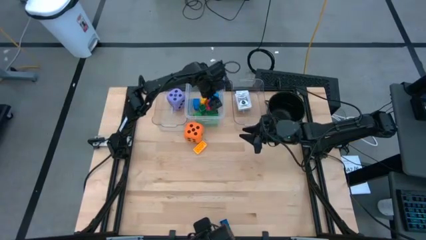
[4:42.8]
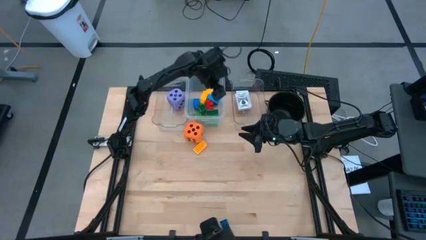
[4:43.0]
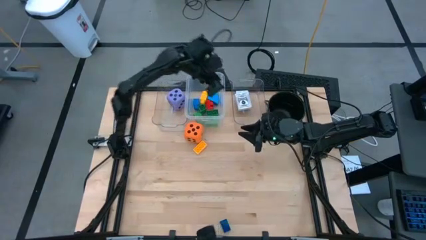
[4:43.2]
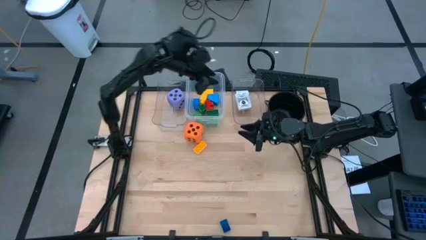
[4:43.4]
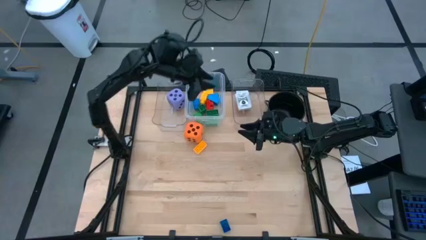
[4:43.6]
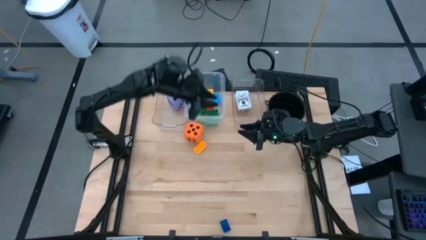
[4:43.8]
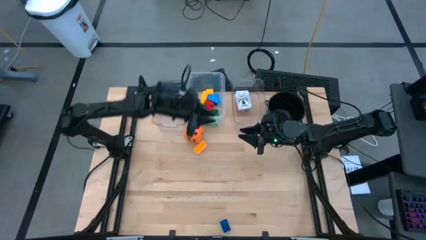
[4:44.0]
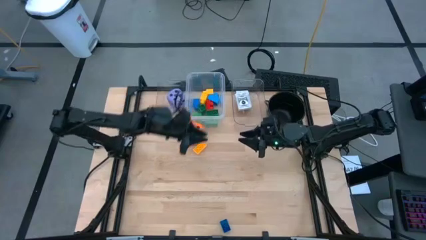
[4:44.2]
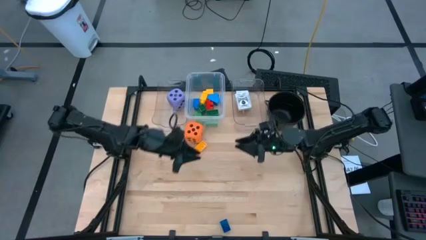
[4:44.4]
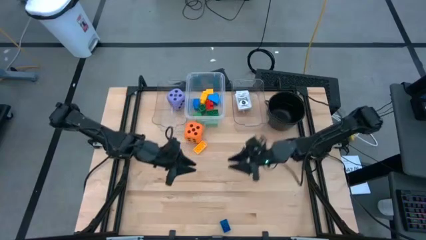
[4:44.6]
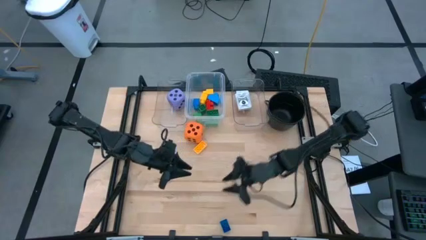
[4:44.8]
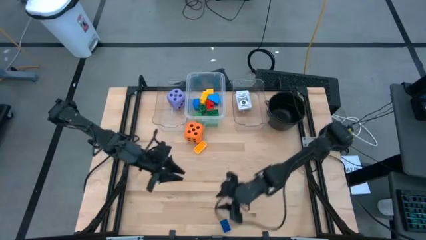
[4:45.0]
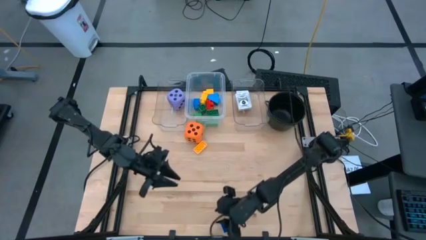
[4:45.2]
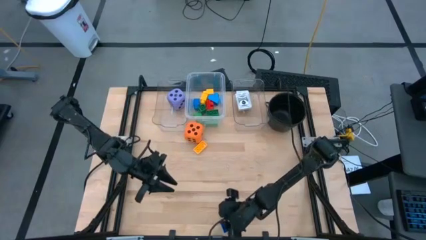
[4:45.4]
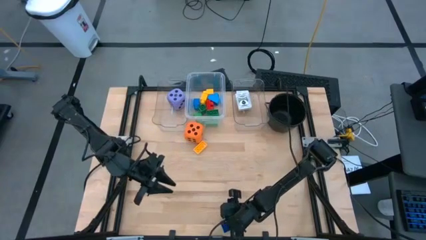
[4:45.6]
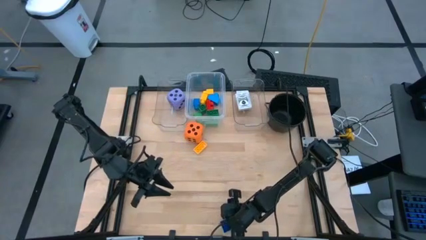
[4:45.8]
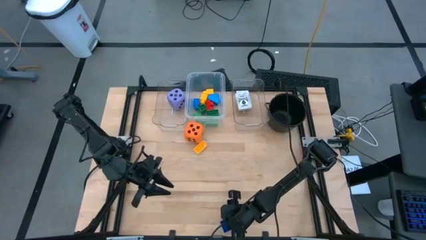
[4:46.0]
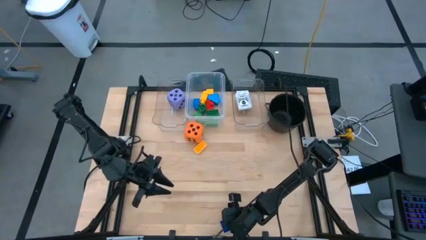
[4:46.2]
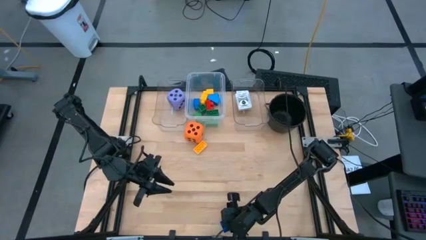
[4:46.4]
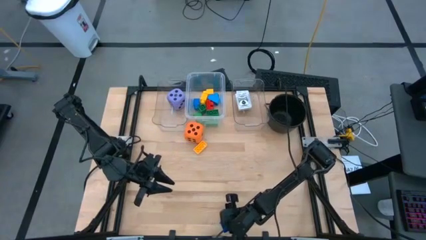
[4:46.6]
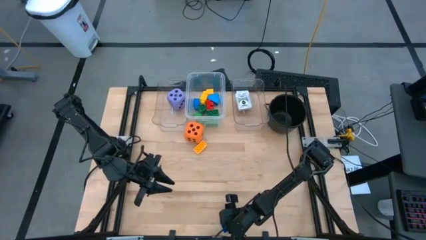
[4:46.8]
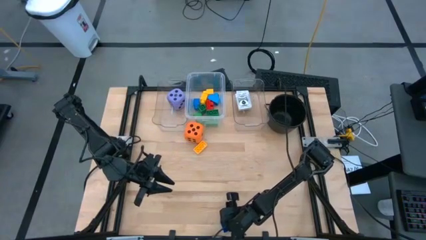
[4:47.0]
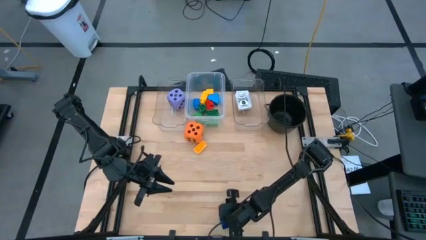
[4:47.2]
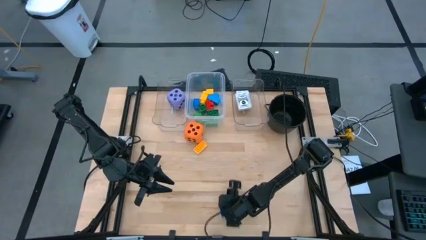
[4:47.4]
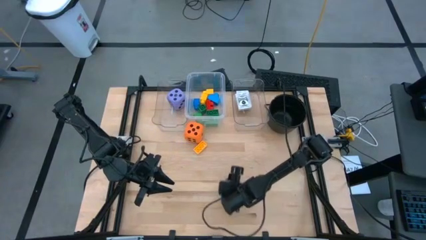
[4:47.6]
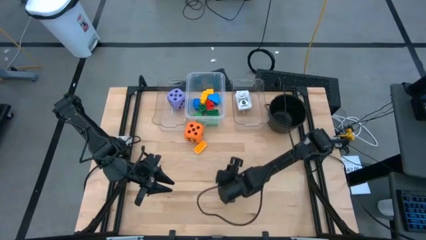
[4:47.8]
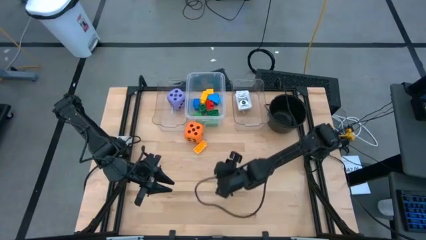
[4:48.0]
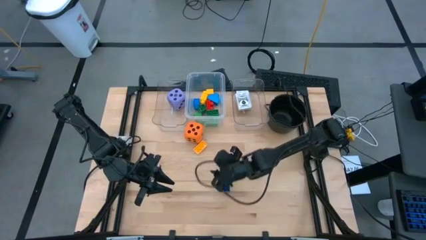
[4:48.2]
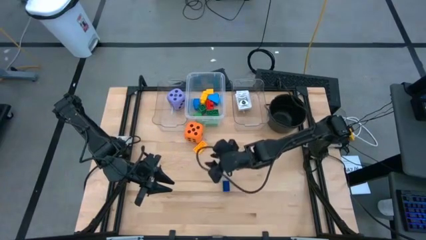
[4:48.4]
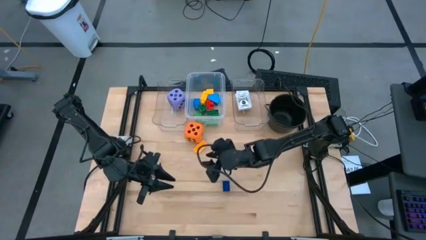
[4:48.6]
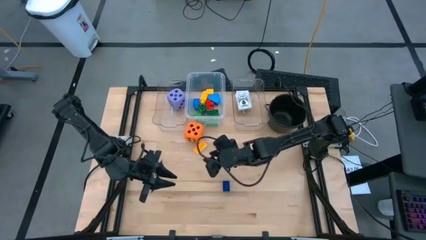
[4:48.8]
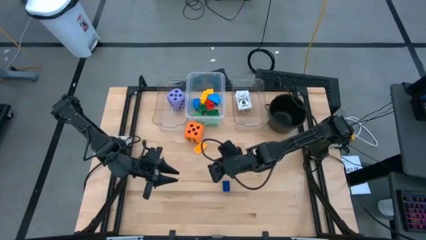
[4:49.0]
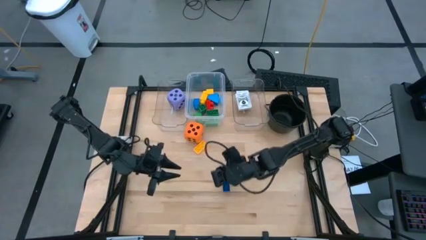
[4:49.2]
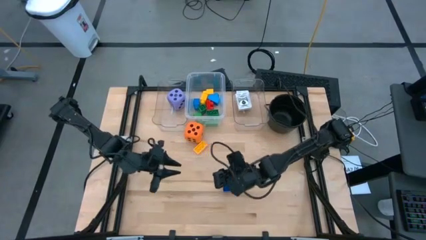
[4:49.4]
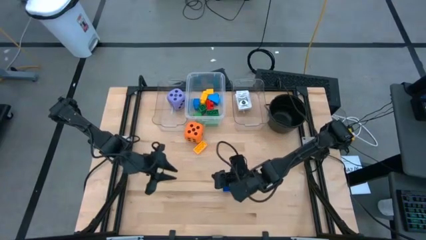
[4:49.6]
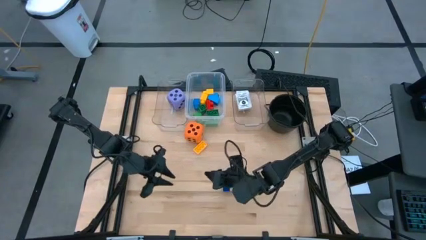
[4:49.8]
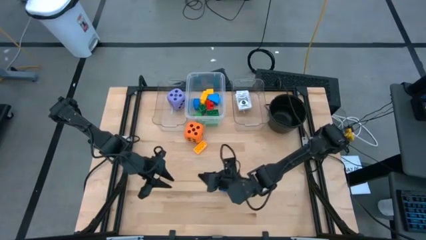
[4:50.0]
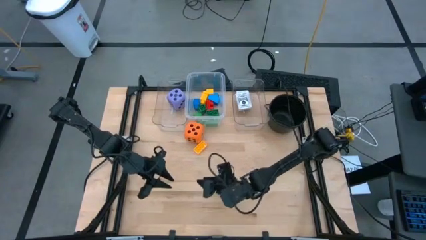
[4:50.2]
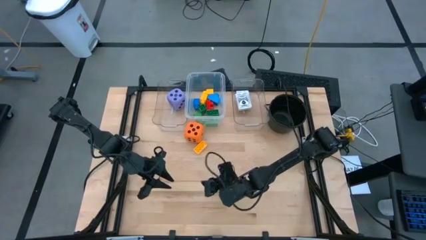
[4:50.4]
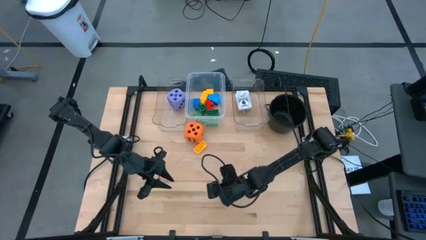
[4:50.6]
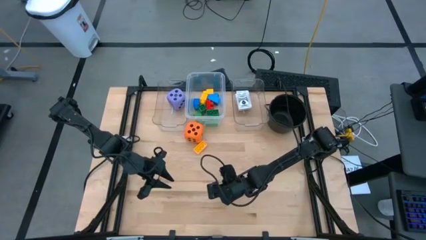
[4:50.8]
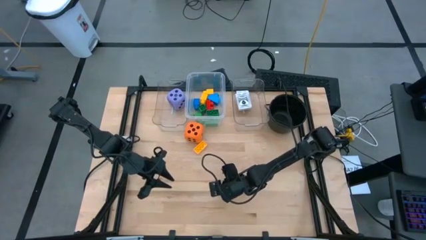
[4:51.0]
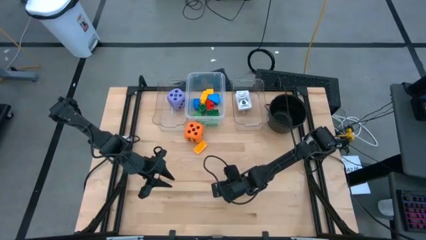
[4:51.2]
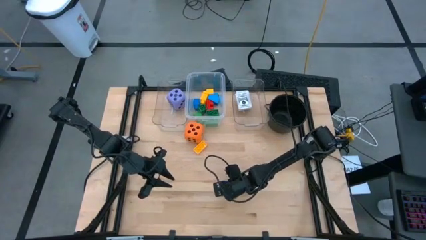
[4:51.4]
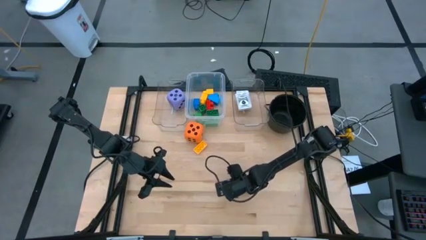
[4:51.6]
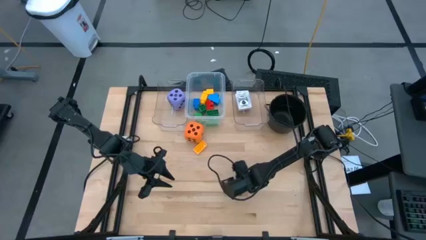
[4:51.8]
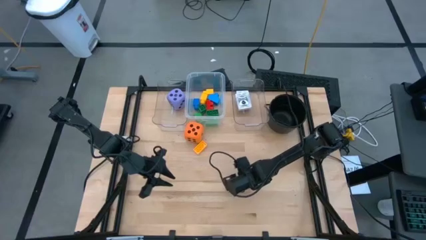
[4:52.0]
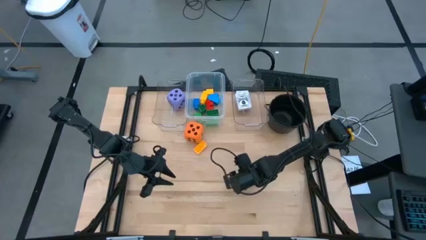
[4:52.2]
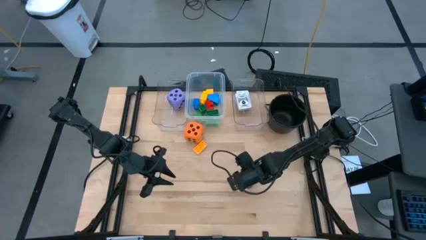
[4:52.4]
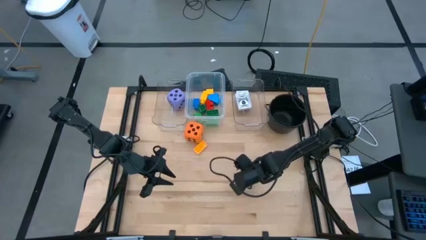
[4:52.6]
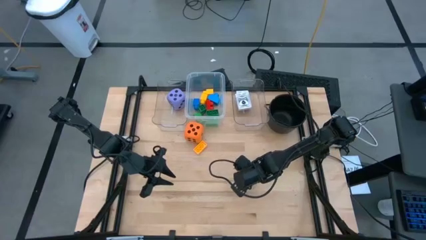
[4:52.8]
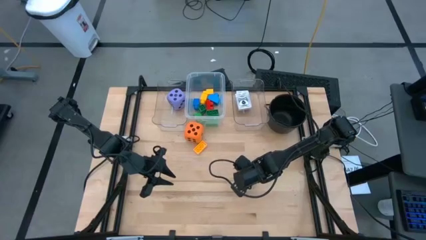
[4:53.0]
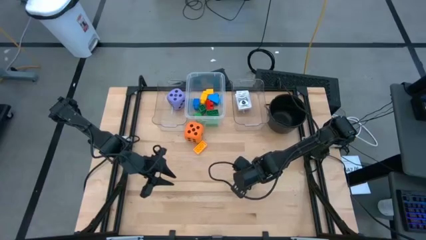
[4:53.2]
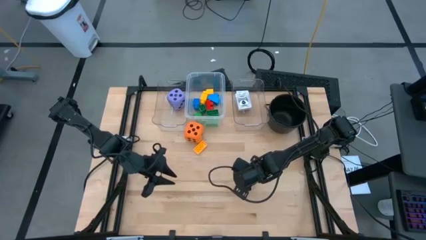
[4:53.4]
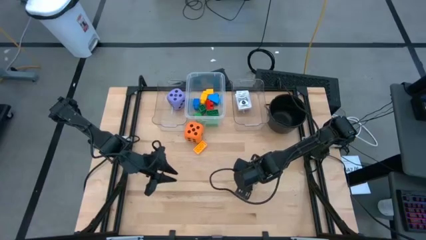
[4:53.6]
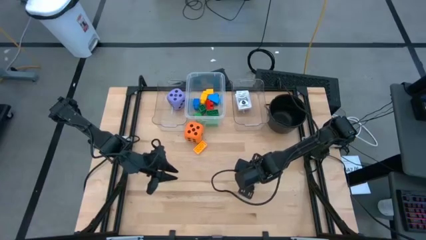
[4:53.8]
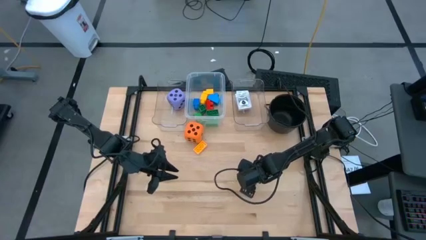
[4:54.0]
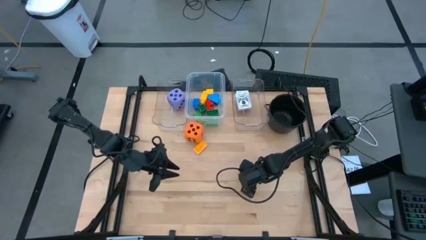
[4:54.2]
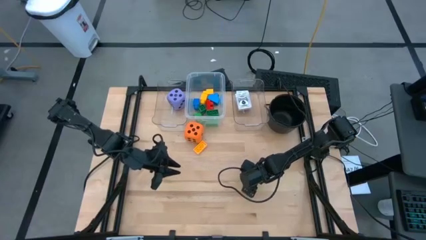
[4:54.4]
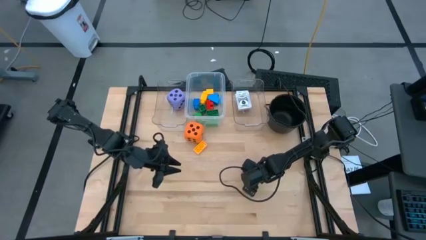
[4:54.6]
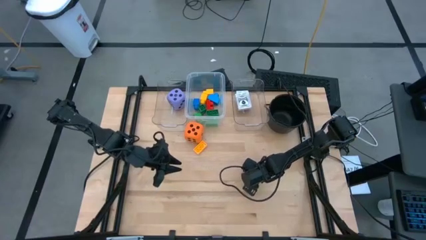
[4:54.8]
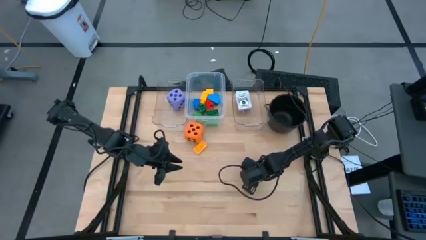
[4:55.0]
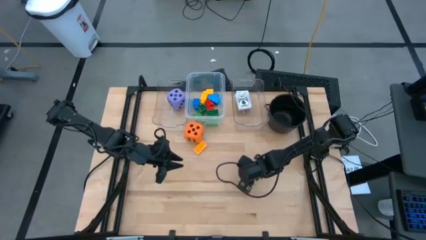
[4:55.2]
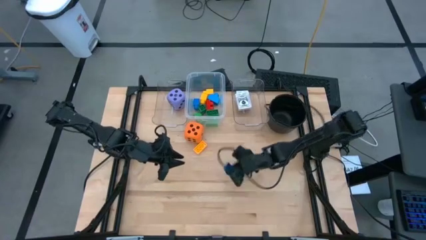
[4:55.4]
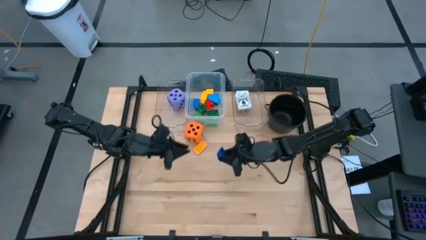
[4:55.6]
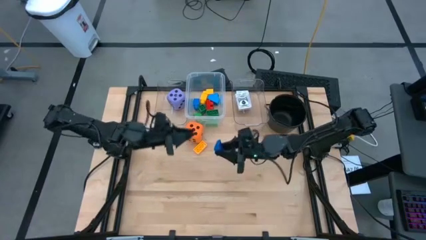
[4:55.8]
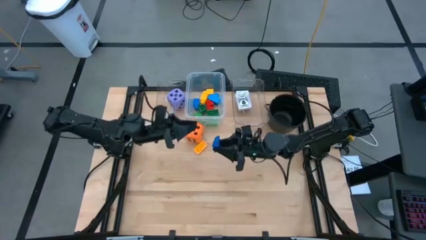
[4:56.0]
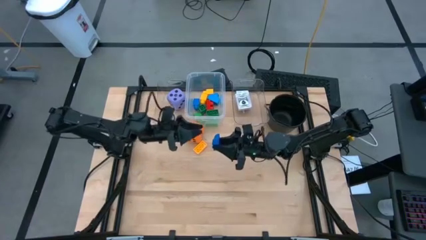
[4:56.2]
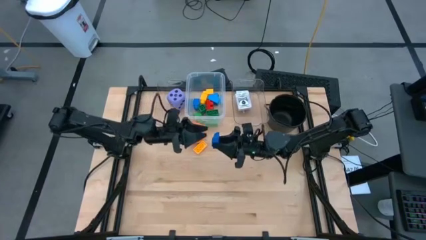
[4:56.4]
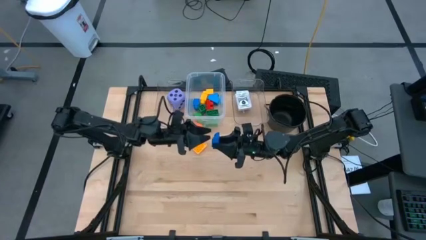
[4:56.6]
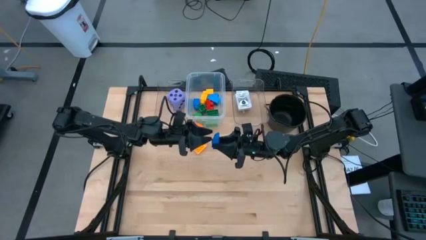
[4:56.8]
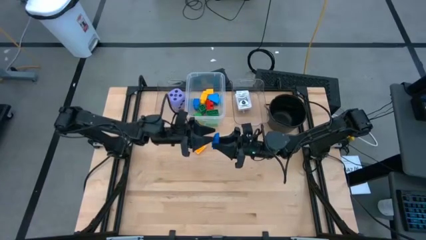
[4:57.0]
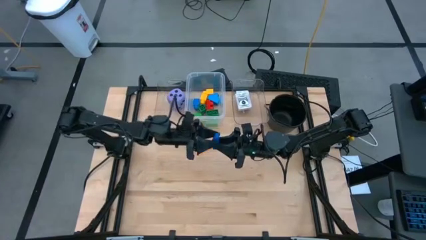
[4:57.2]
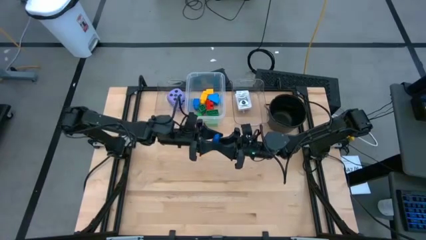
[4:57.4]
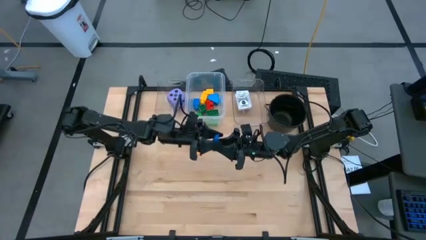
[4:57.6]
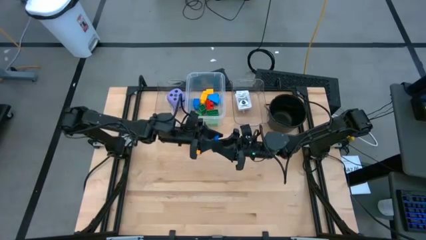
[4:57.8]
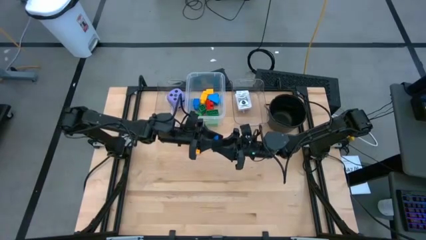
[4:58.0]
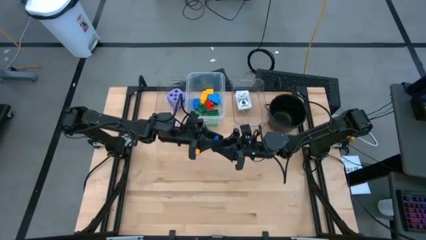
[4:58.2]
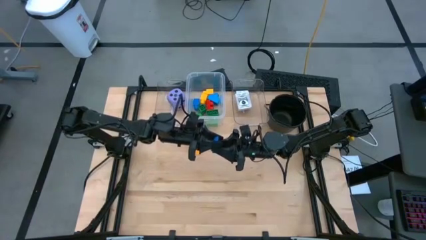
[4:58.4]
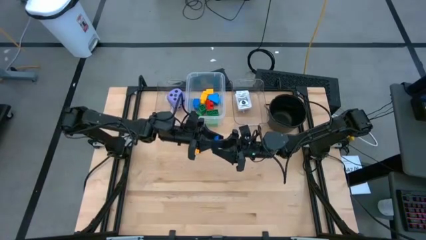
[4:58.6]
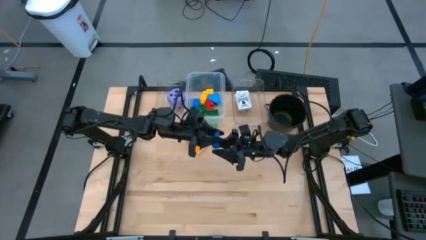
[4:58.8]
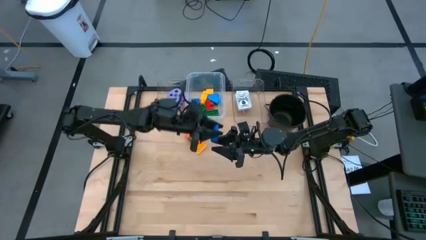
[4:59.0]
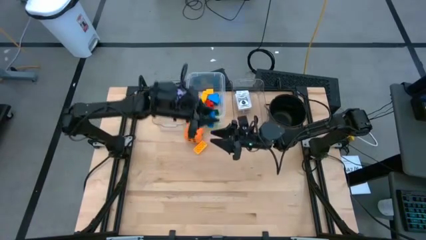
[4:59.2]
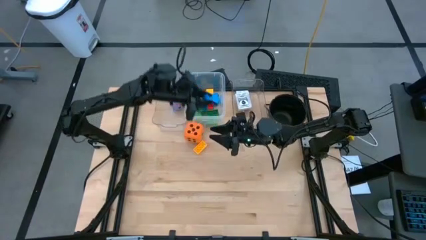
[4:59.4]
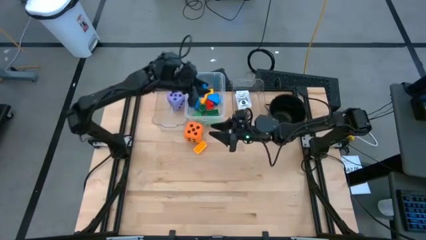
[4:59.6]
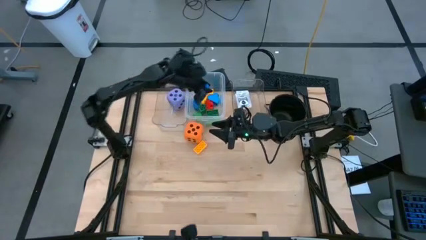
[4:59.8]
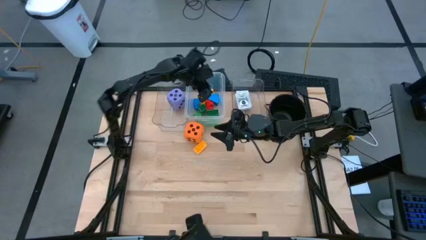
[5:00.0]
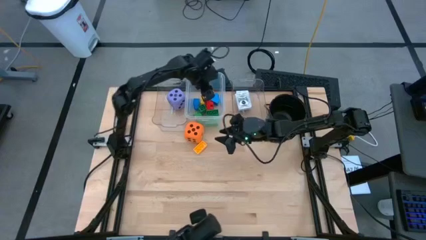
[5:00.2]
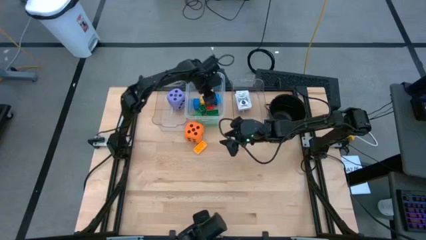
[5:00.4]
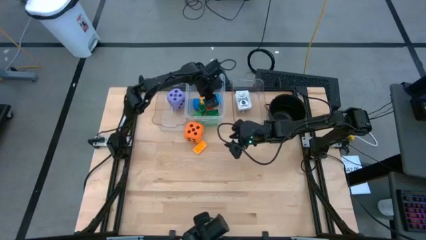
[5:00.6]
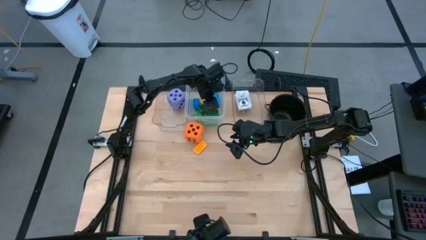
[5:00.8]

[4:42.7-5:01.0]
Task: Pick & Place Toys
Put the blue four stud game piece into the middle transparent bin
